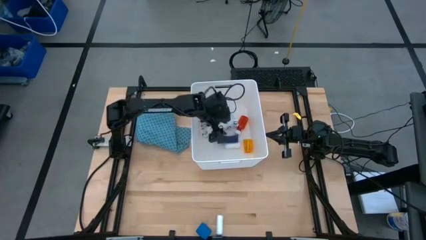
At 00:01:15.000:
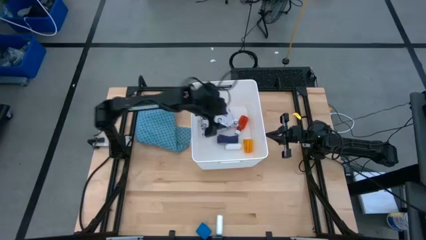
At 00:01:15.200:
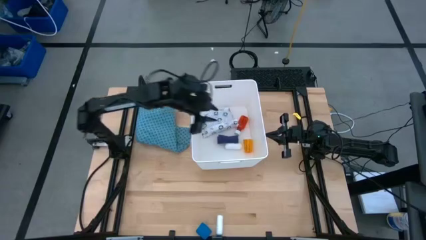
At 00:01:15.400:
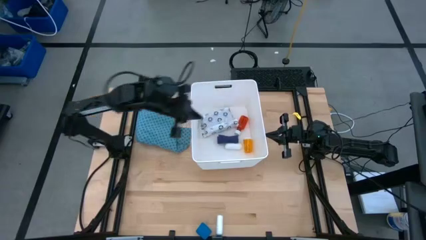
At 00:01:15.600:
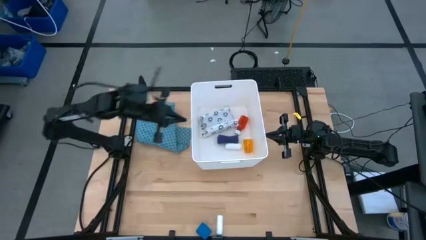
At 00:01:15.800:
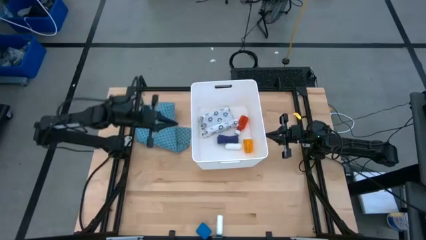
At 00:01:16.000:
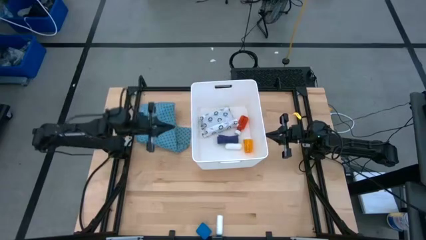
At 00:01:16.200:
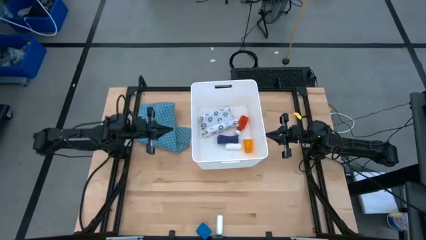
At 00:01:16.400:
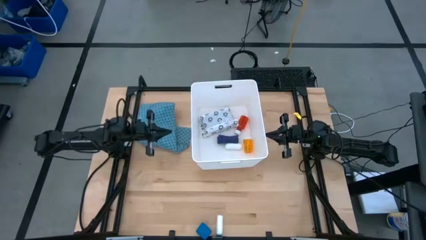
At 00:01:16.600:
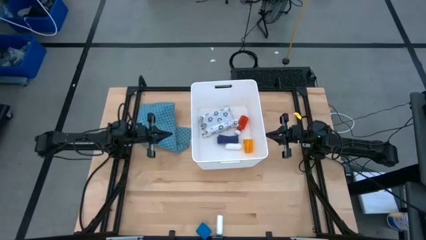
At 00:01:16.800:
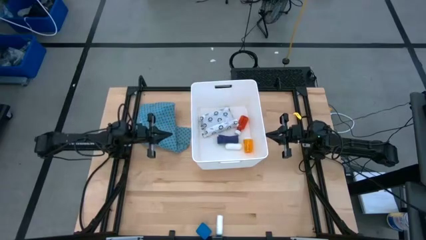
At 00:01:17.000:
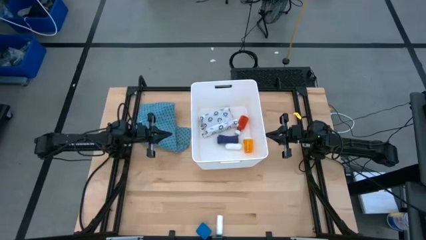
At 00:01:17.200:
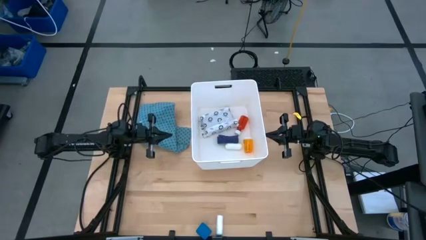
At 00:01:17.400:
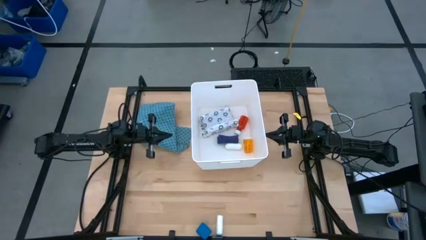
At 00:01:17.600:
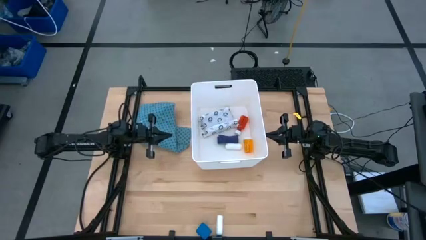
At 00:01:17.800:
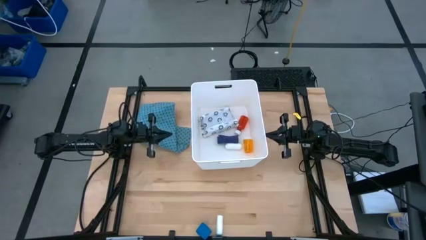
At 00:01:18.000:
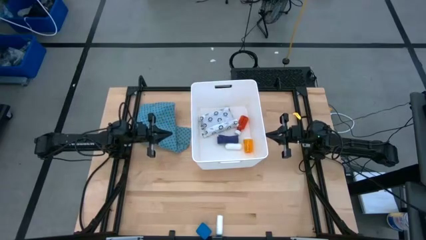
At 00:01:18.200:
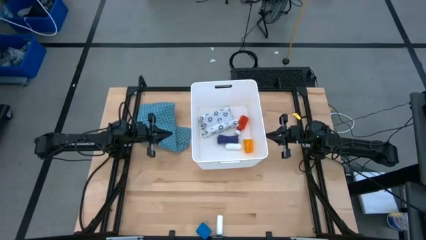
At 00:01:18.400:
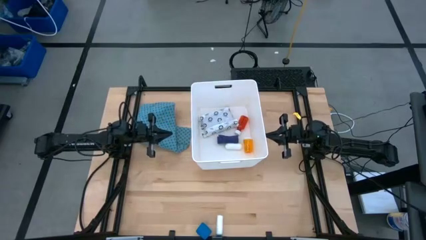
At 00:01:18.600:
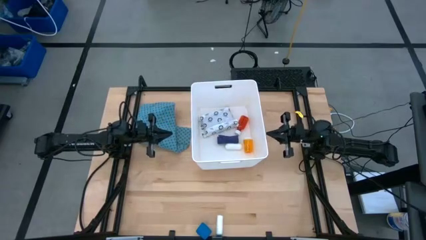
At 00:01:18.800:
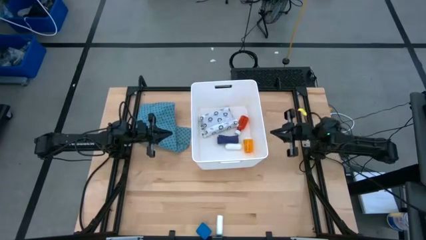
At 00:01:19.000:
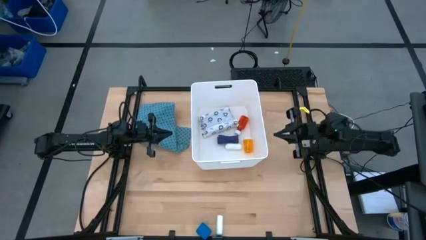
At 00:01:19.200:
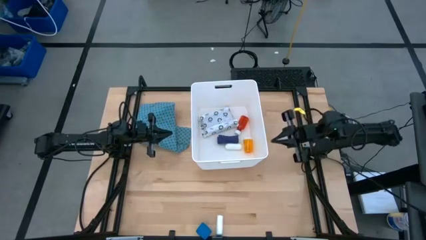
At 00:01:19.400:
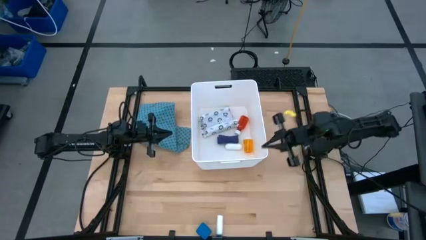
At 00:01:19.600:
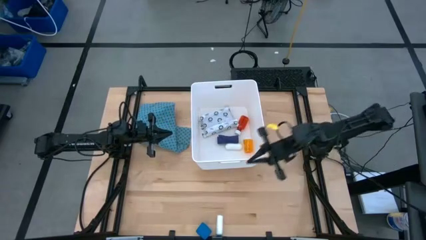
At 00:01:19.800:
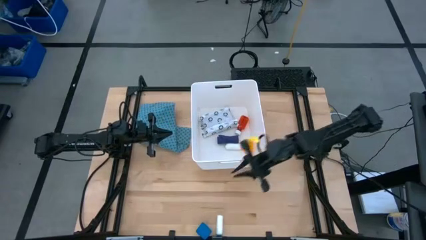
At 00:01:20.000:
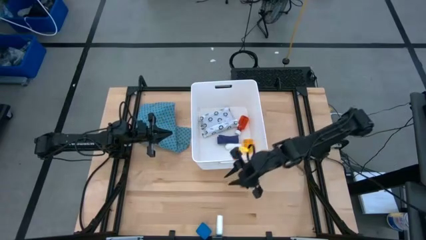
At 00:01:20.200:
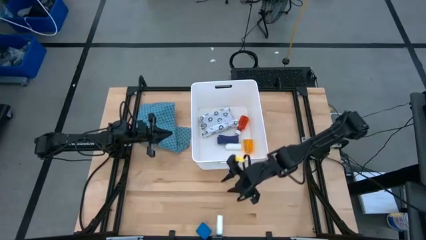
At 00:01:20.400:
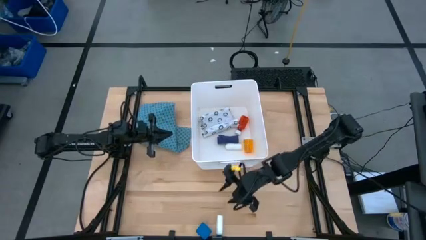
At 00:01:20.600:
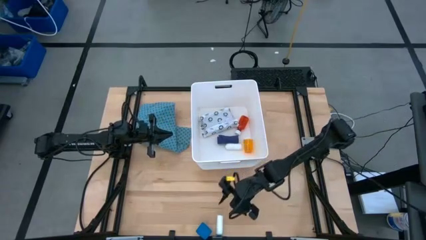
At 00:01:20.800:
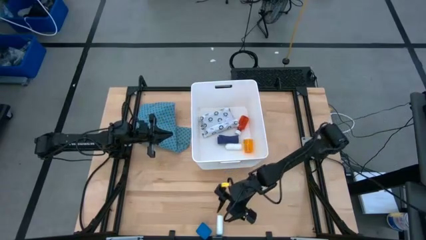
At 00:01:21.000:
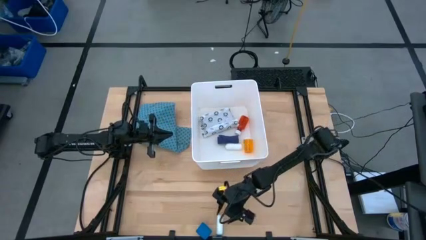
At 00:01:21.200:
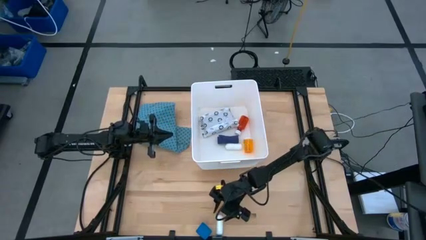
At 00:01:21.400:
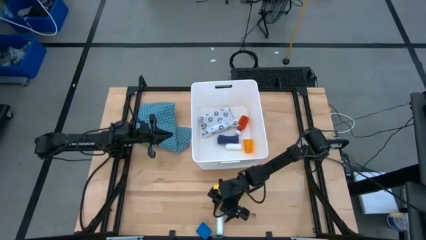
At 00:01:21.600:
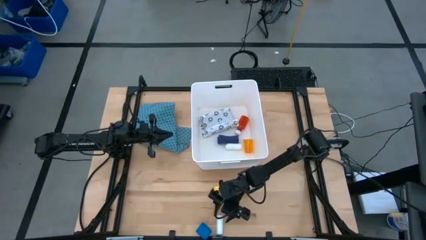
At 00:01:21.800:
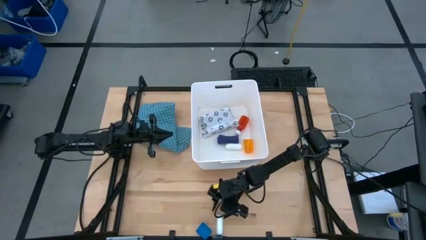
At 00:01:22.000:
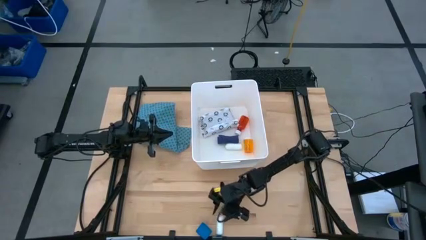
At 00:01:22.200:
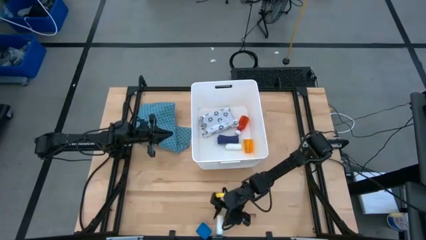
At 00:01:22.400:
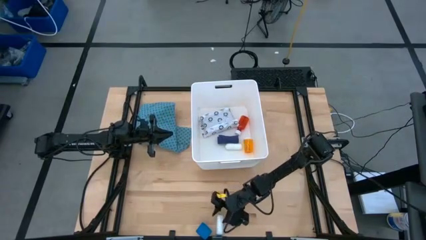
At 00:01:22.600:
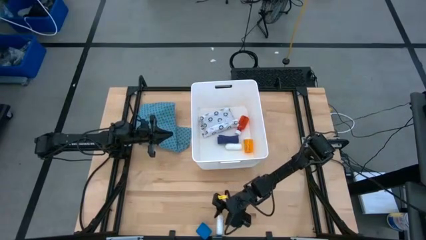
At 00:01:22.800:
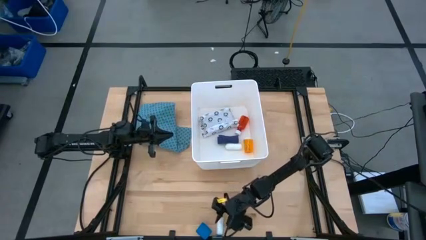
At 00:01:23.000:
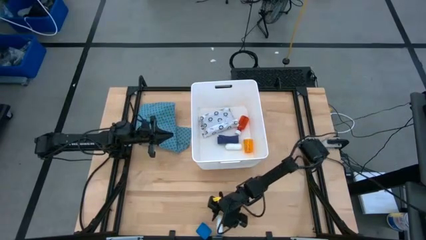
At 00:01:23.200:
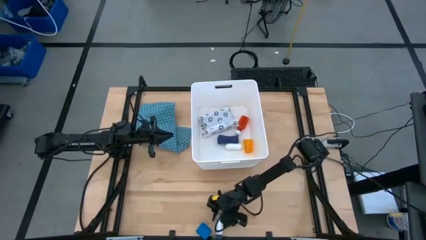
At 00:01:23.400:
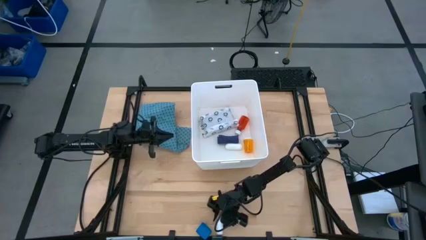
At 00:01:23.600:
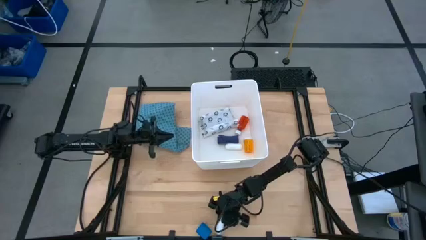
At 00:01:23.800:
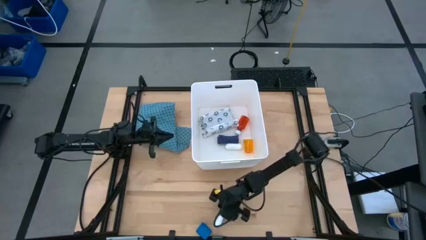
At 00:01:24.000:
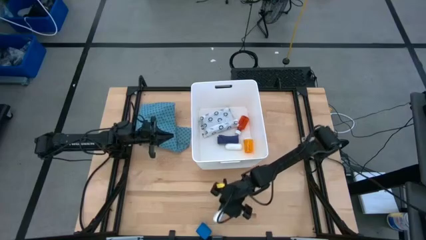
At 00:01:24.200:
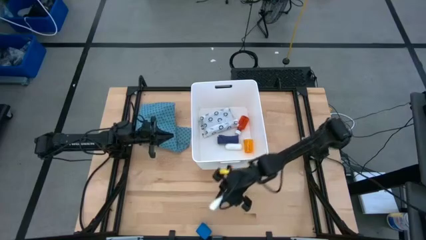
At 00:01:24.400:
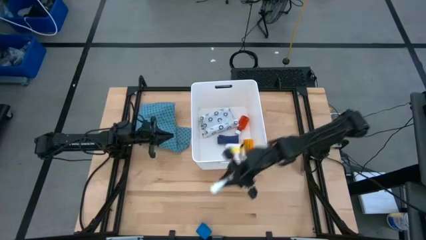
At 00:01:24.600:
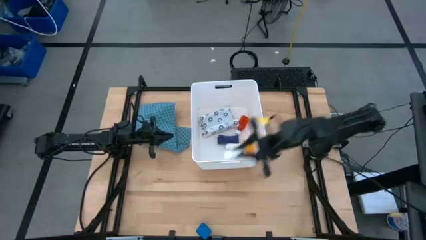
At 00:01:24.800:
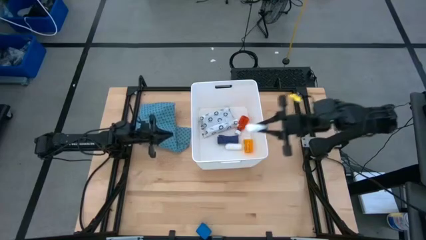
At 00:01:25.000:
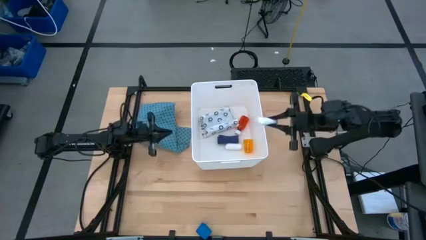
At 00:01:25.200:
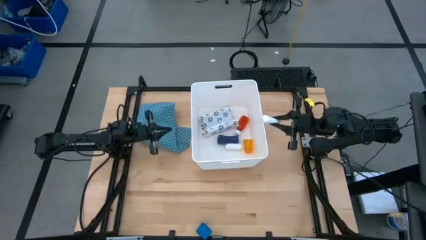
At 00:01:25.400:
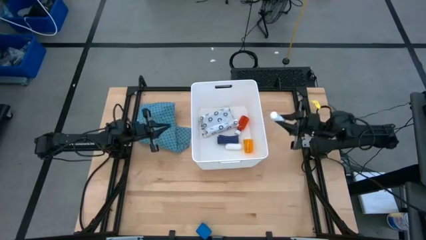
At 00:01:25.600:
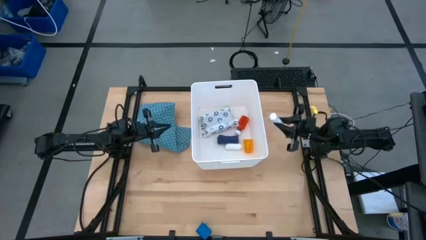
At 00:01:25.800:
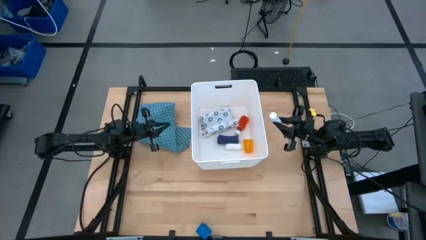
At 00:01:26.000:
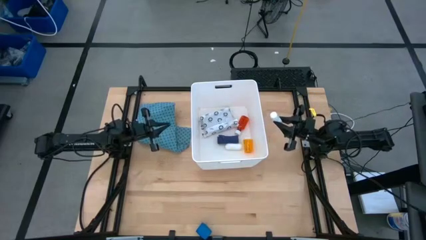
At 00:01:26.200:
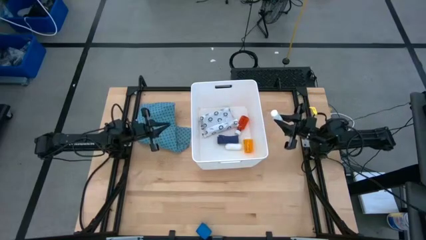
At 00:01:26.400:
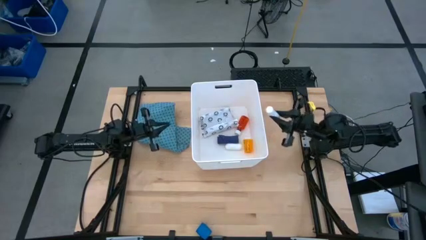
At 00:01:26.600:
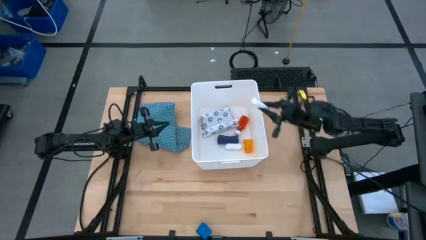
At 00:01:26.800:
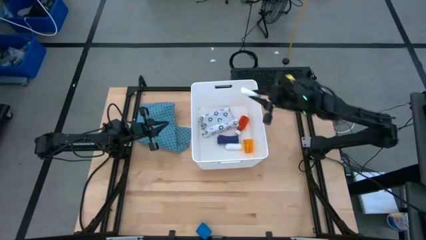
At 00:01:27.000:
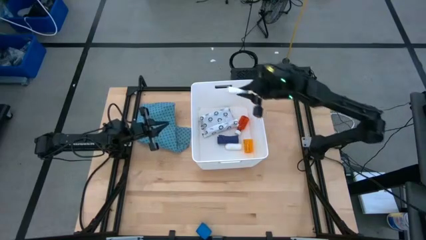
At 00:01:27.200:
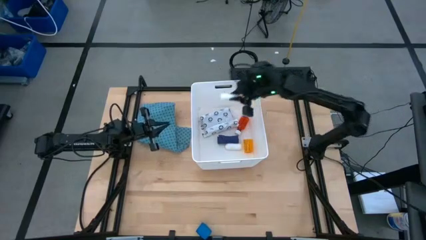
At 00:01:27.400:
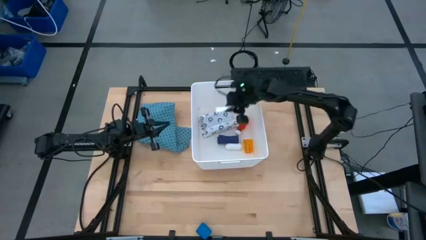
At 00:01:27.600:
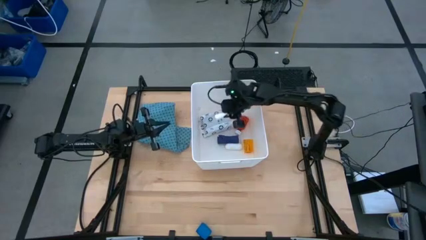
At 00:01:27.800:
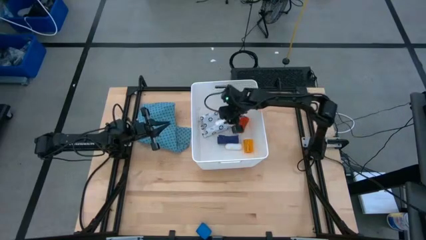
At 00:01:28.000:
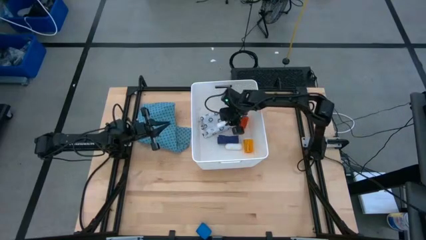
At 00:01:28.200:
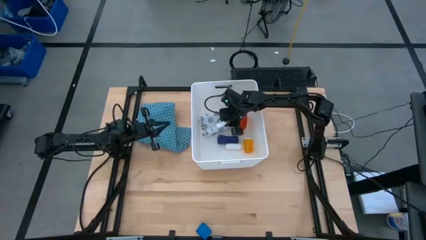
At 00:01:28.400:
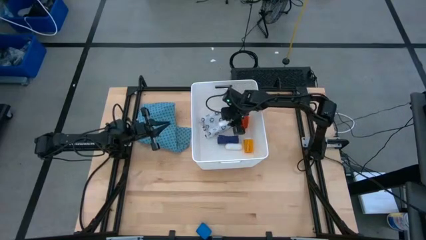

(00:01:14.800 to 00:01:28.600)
Task: Pick & place medical supplies in basket/bin
Put the rolled gauze into the white bin

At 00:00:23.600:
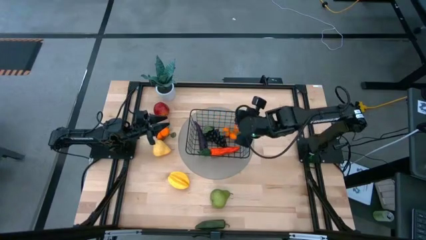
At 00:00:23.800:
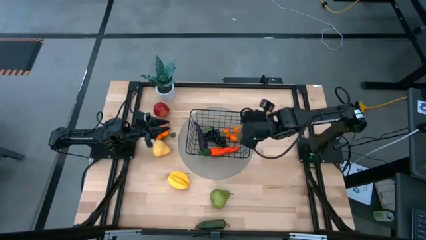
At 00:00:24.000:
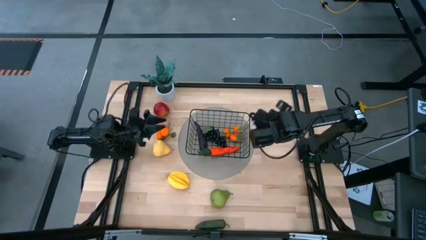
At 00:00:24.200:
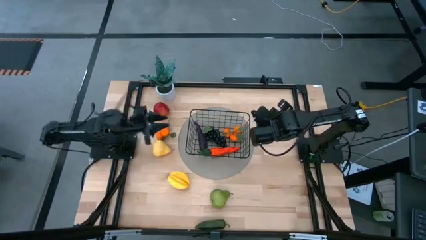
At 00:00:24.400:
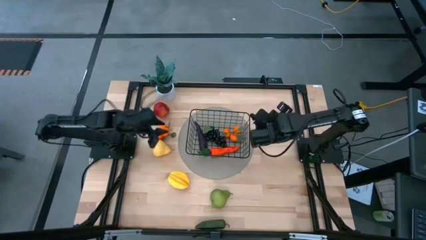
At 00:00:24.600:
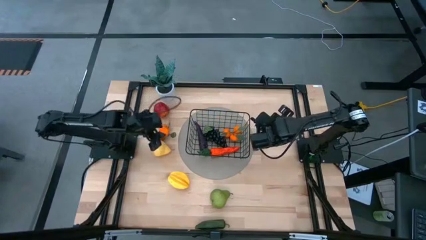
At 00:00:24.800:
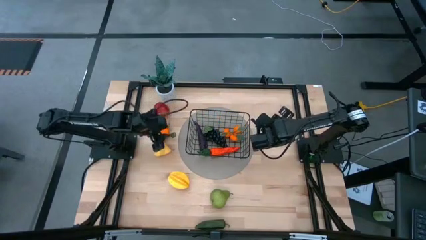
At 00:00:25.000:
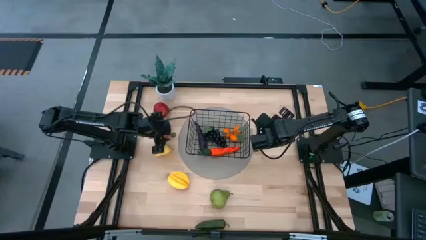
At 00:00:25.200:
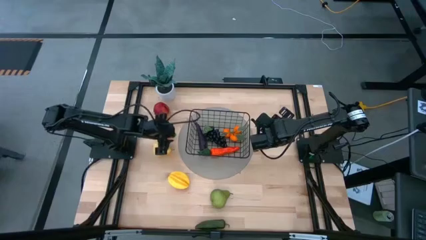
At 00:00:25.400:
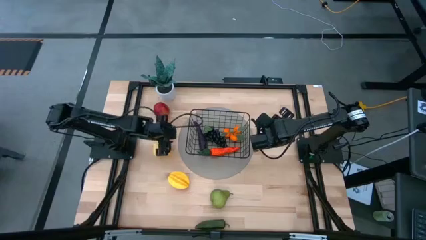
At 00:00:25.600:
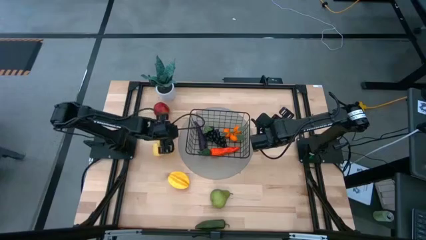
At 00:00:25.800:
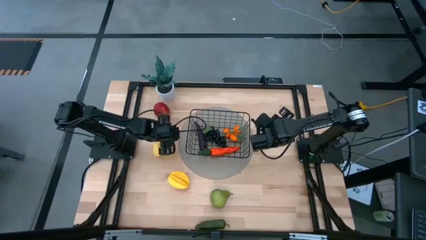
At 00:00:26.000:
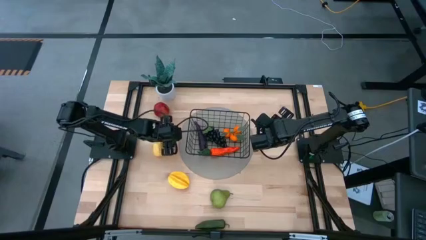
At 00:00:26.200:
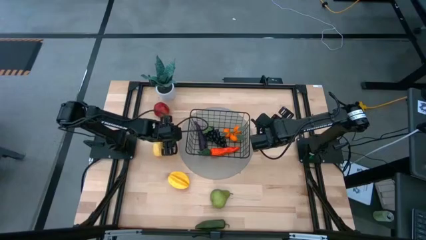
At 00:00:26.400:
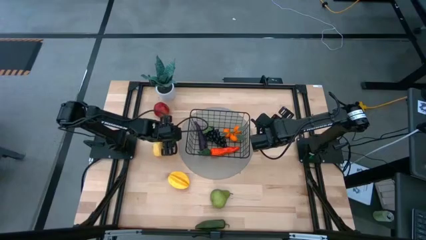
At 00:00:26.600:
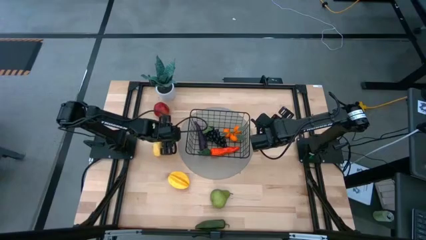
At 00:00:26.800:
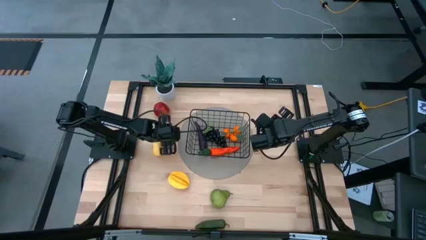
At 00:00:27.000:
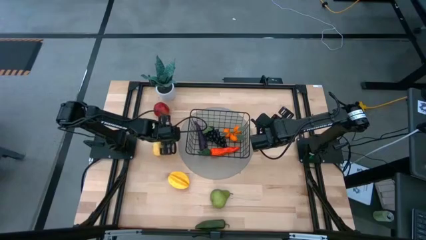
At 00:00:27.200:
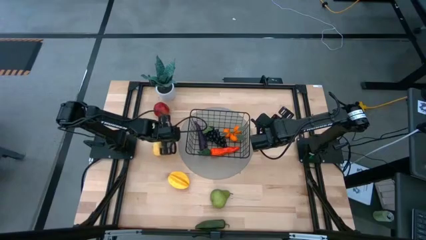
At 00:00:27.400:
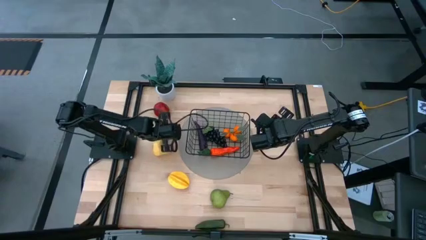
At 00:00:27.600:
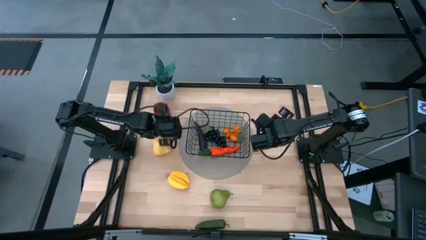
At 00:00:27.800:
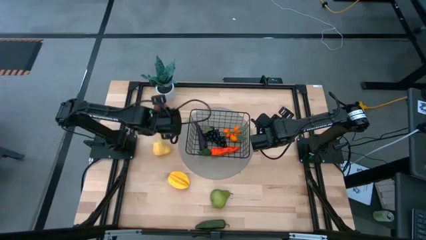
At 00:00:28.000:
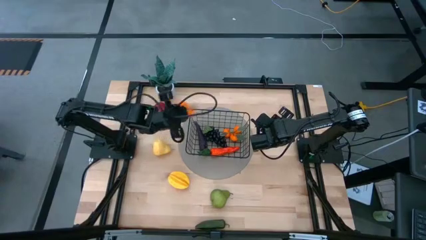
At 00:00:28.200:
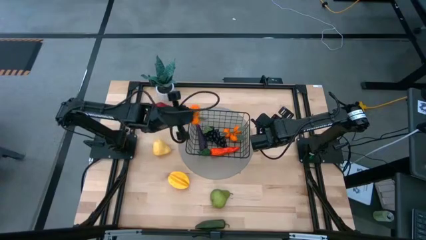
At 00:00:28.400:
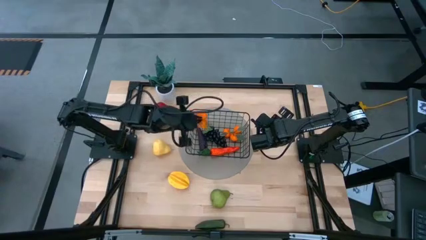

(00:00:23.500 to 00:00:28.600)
Task: Build produce basket
Put the orange tangerines into the black wire basket
